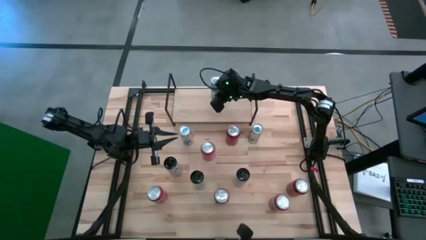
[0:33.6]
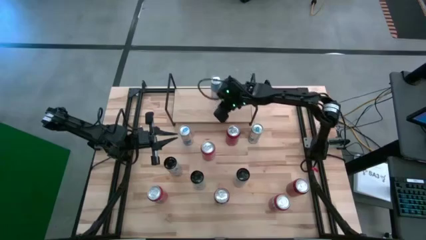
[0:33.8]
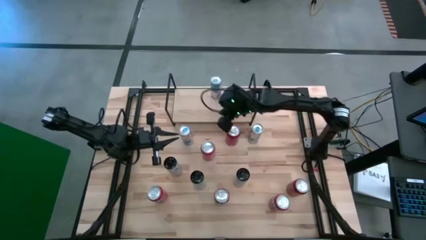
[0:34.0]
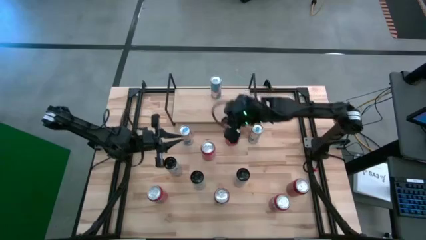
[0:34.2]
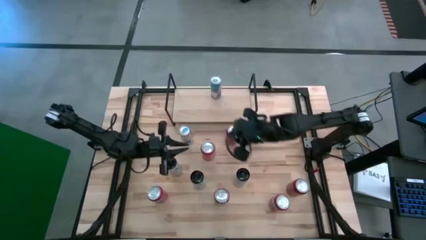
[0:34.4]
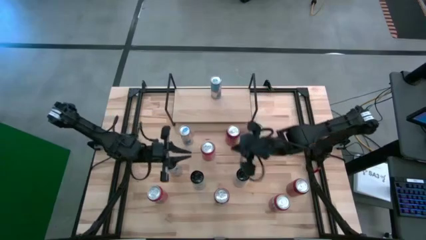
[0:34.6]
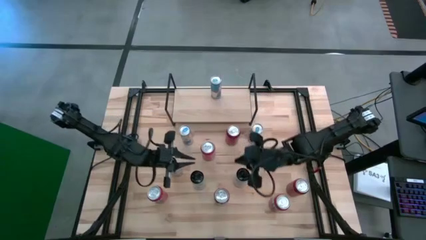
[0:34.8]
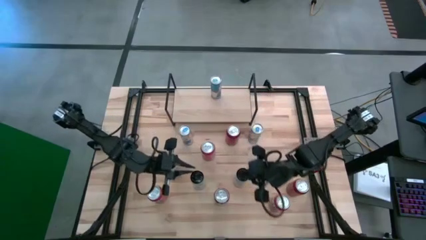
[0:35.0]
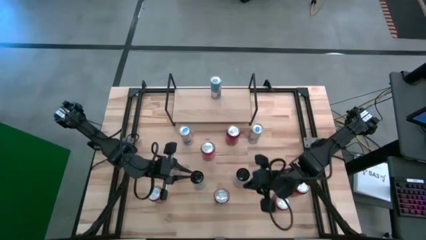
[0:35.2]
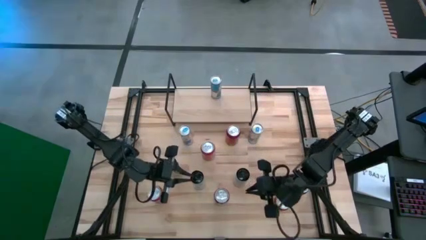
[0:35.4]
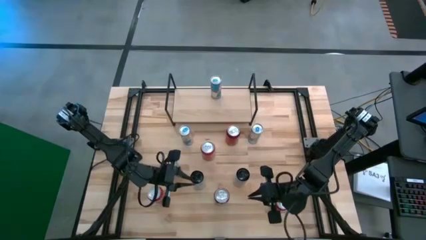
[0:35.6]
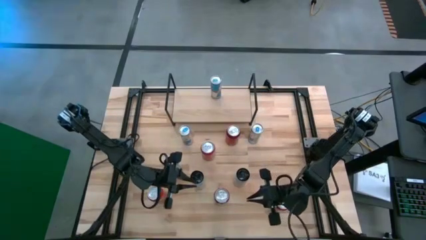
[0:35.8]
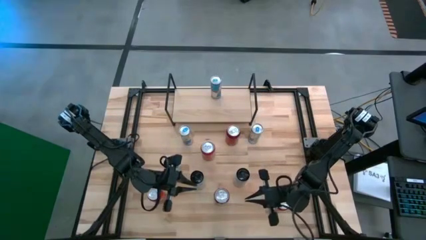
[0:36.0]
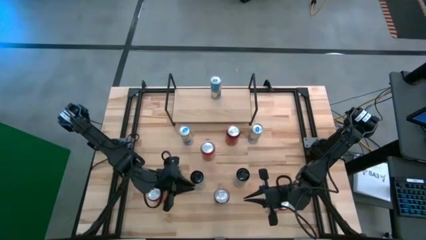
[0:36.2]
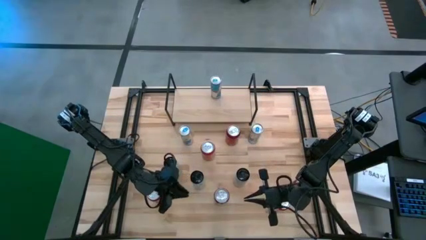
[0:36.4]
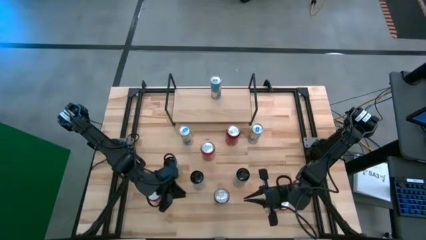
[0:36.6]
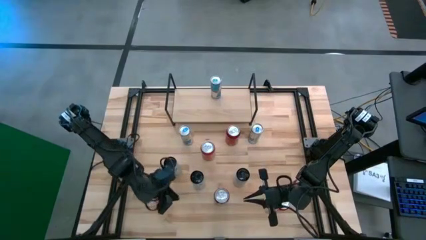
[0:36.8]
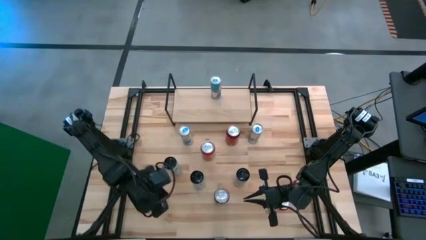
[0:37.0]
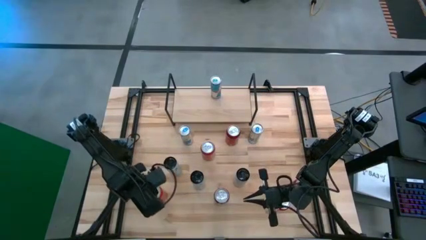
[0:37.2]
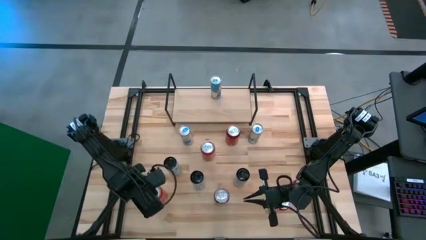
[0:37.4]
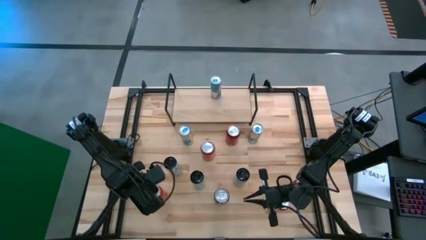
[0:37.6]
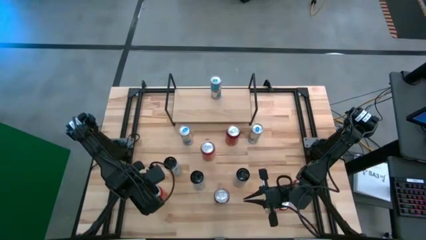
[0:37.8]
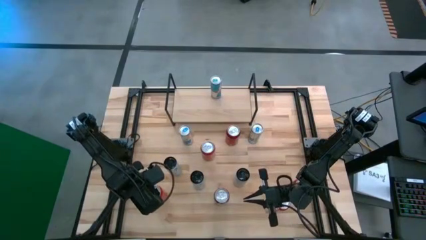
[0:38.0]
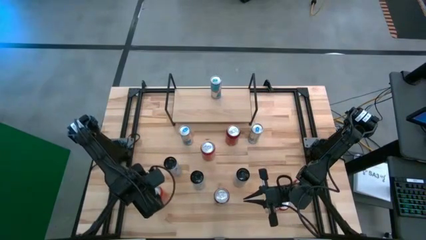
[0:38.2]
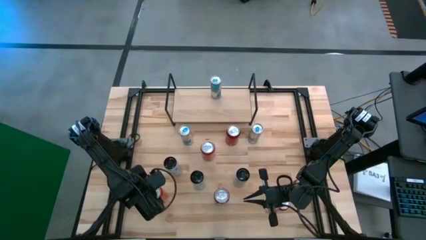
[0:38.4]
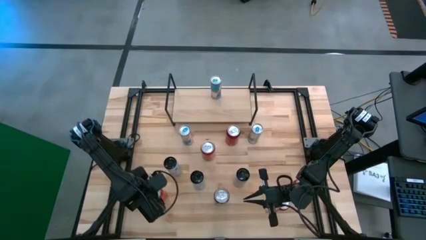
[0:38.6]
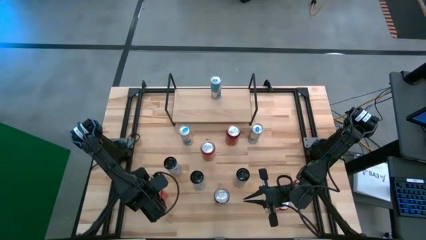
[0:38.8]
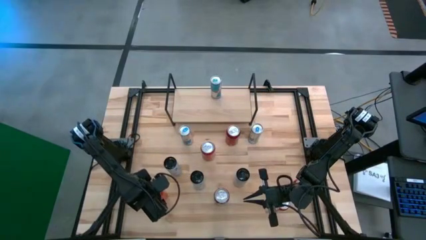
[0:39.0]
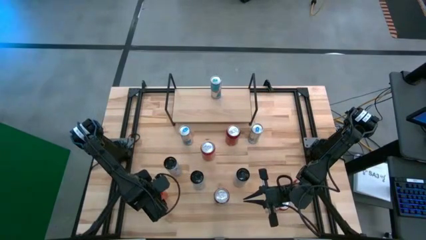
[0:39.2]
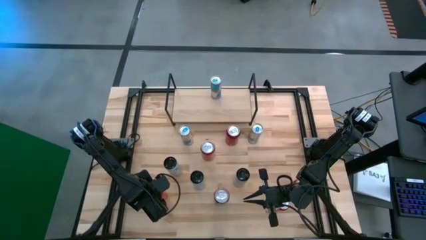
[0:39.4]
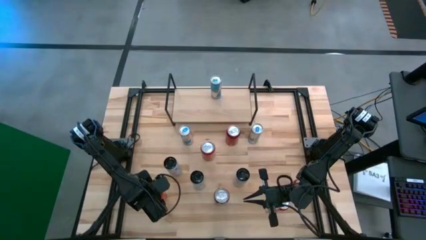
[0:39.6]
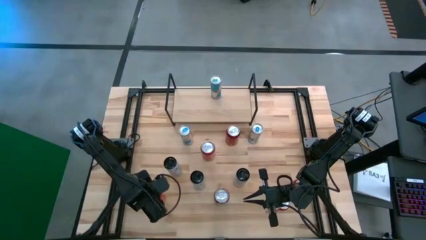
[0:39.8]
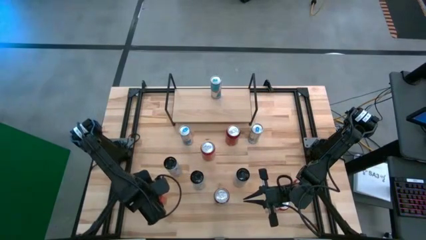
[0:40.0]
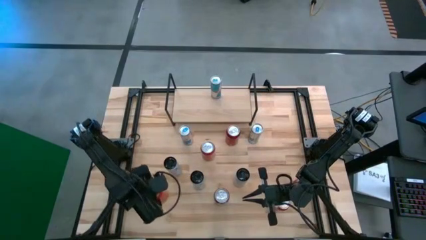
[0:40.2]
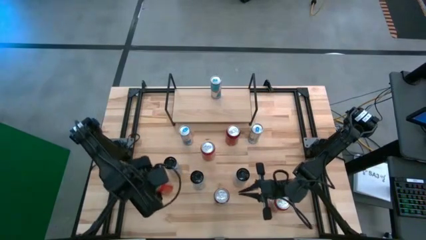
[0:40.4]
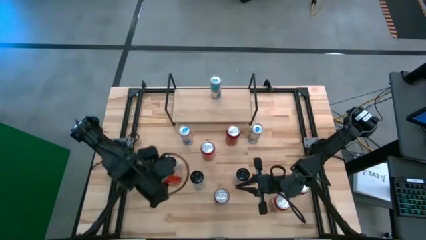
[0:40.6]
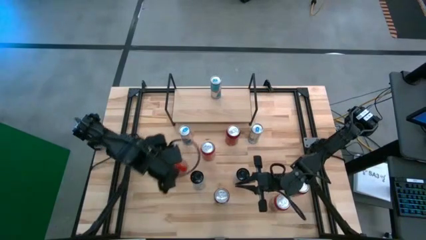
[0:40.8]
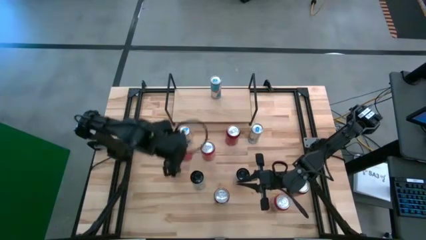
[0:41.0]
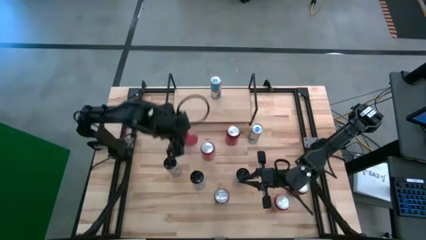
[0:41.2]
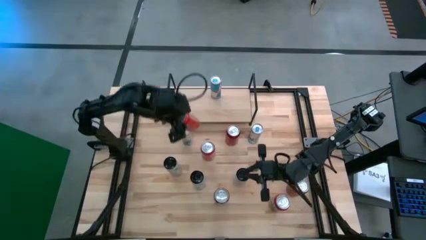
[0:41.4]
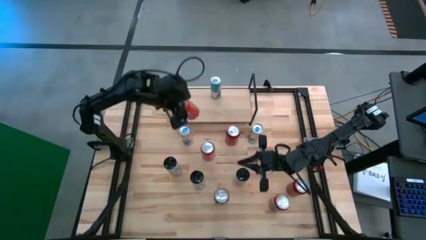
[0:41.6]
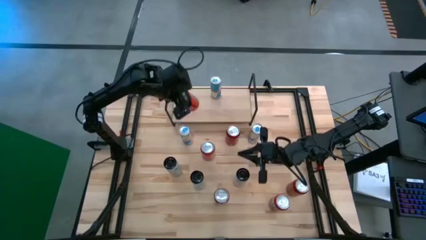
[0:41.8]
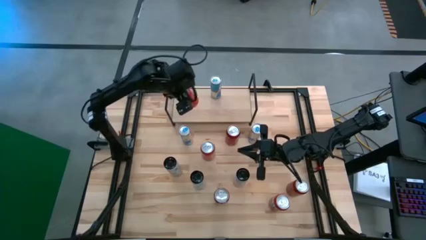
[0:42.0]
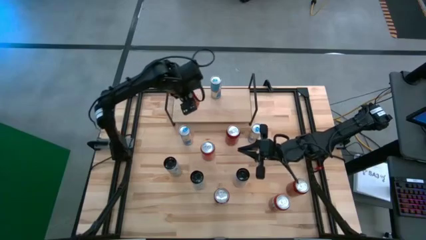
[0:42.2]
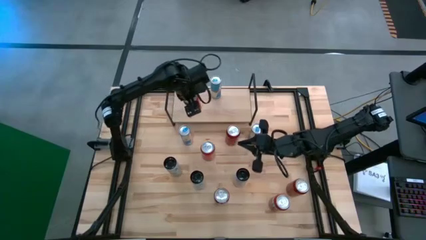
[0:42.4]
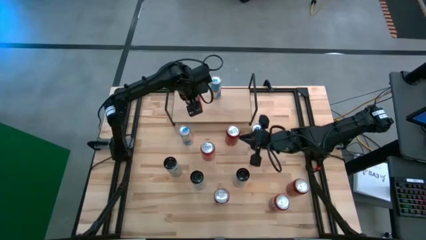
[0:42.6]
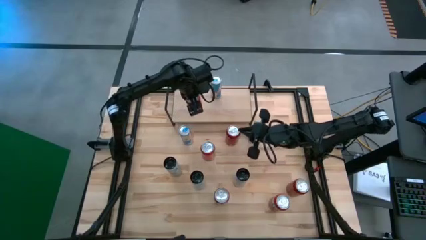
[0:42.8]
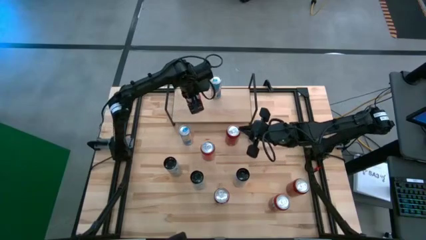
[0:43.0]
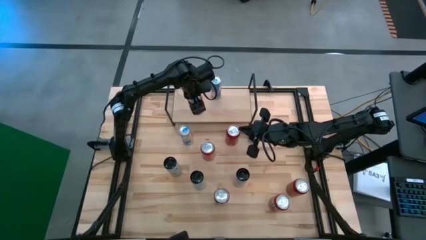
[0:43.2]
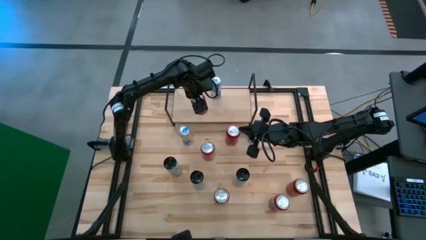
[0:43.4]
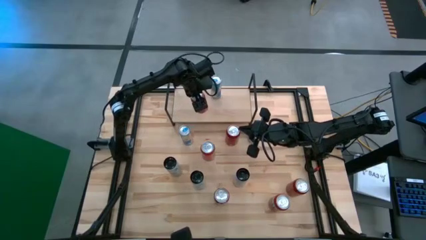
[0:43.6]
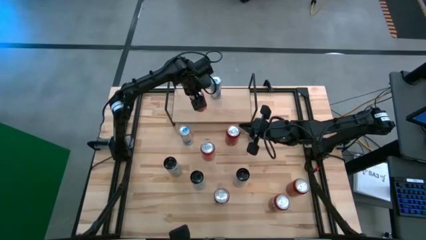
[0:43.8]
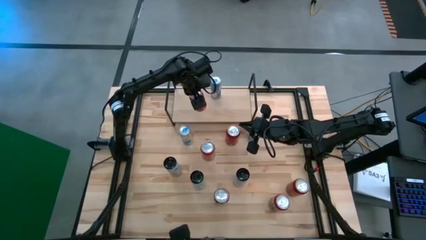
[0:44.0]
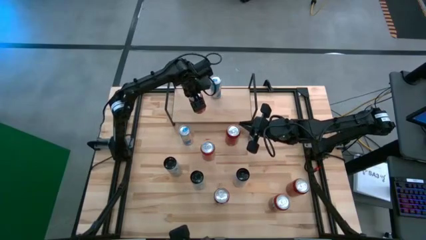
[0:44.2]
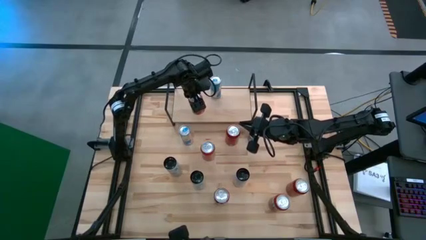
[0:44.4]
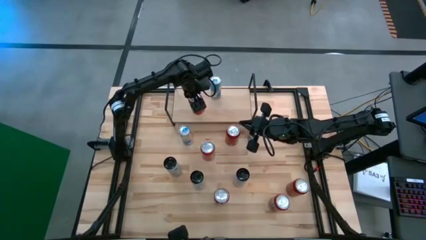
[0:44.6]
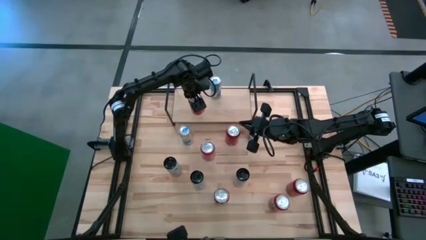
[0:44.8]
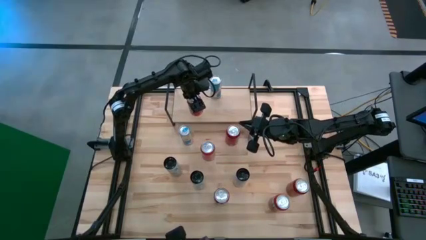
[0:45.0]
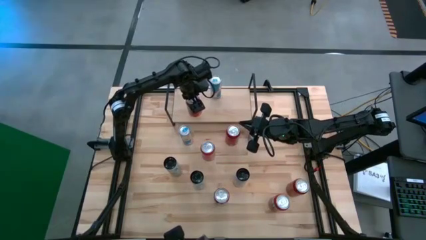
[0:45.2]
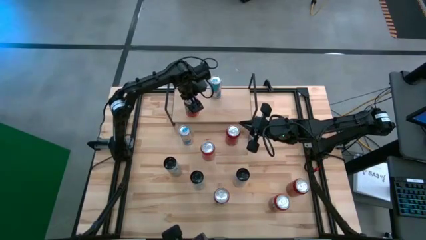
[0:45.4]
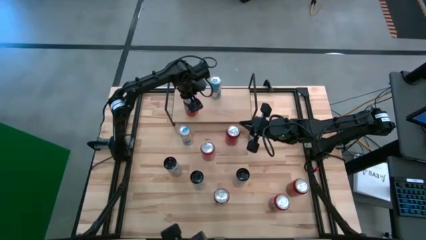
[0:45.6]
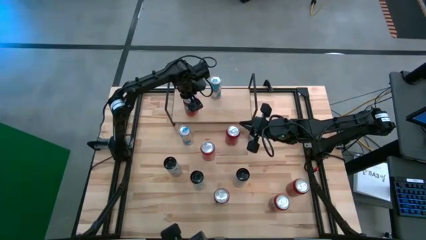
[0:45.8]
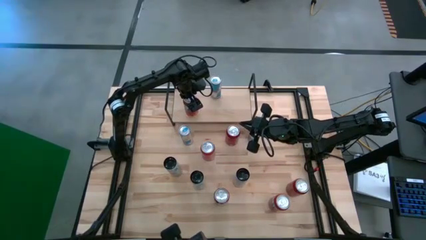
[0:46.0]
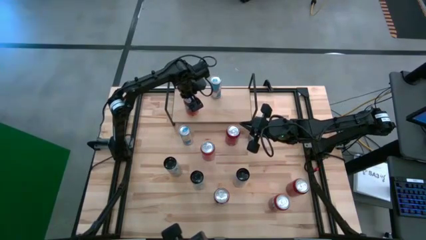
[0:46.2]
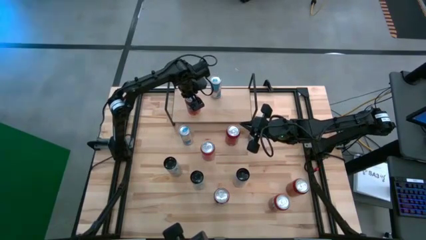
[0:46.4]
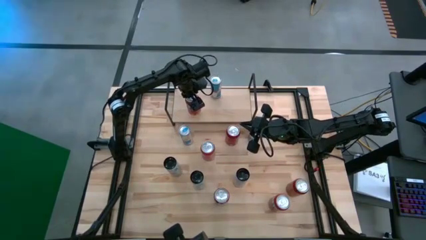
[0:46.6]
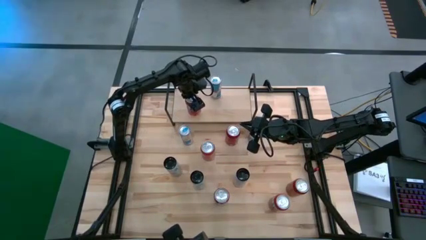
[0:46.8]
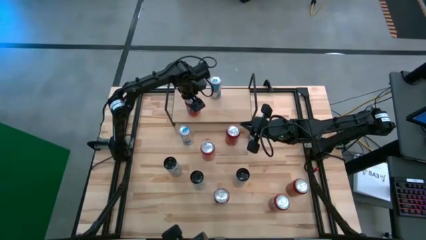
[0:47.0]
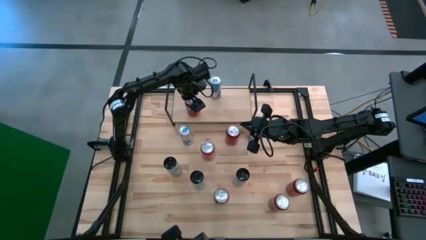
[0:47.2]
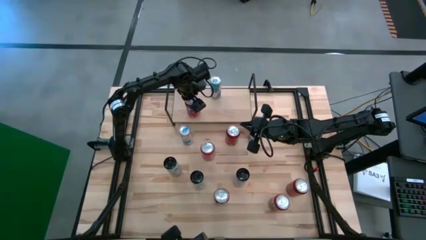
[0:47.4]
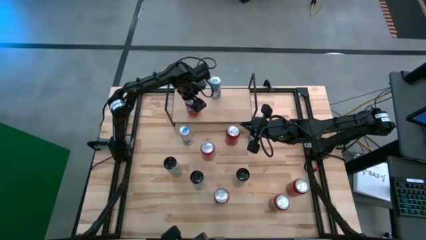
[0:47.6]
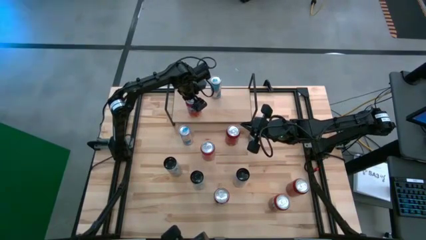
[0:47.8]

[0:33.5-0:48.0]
Task: Place canned beverage on shelf
Put the bottom left orange soda can on the shelf
